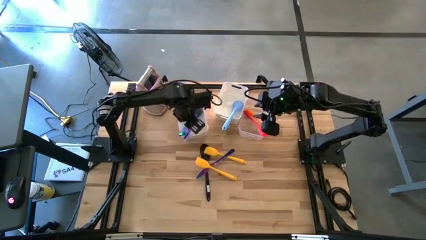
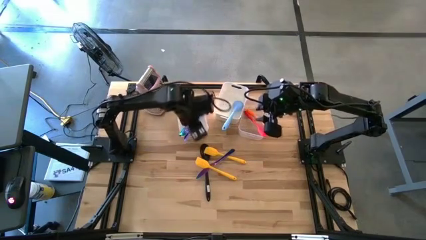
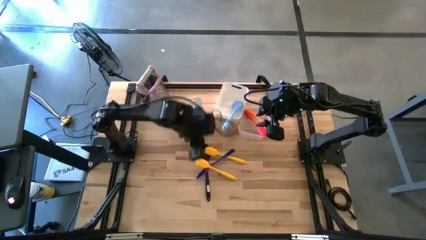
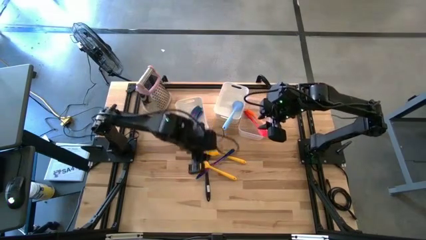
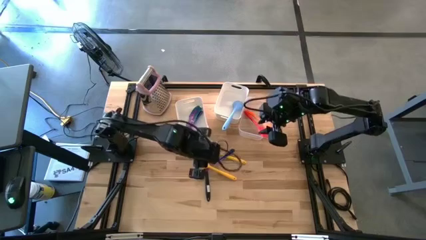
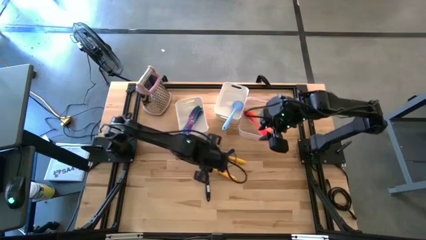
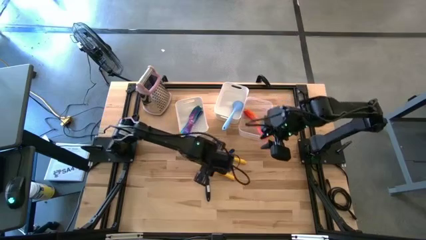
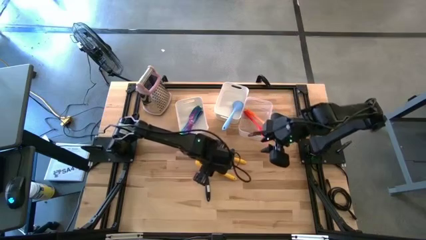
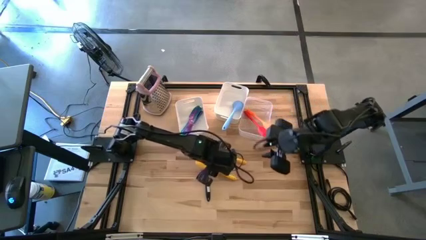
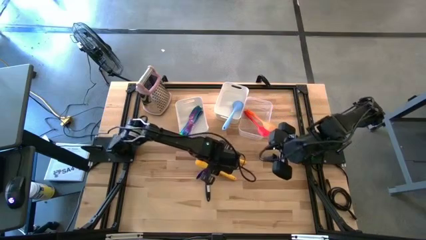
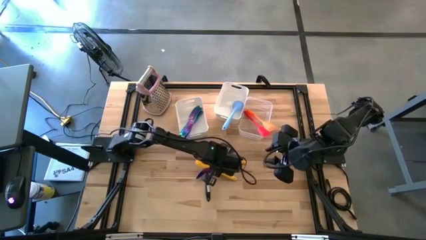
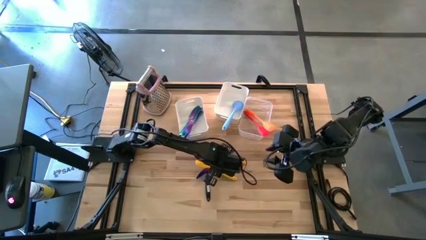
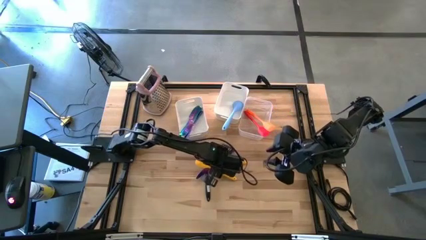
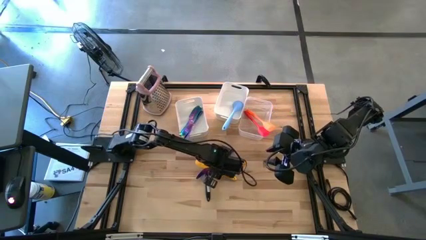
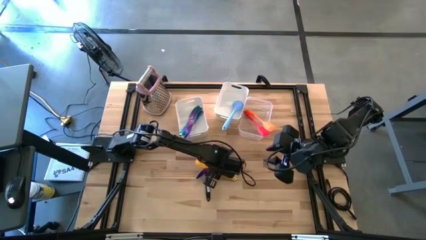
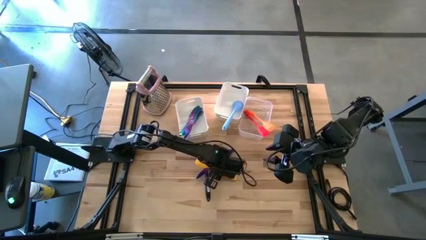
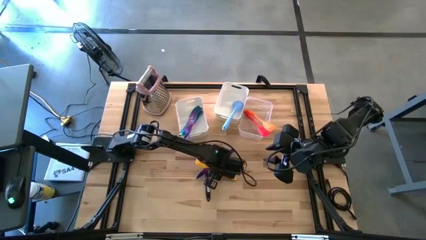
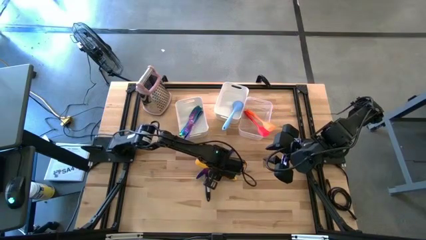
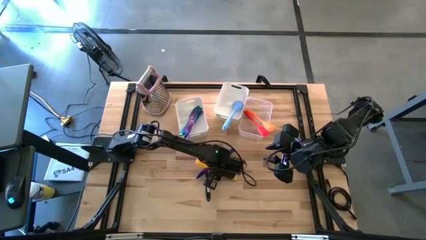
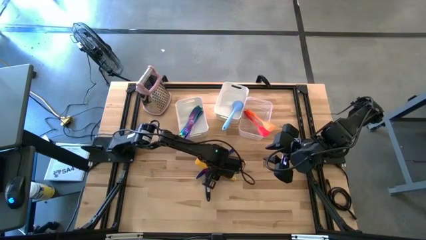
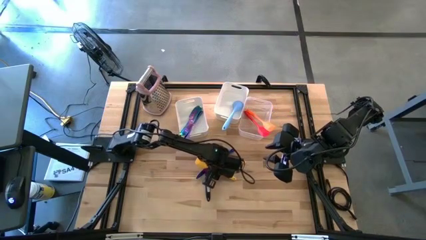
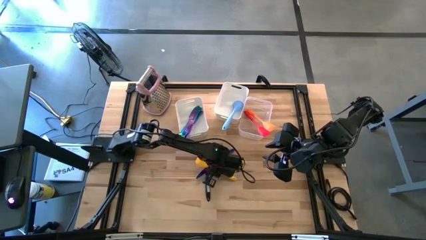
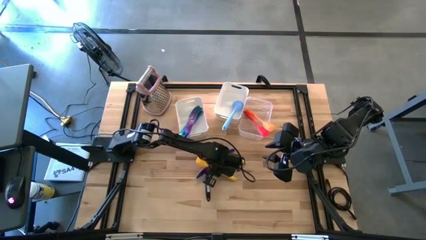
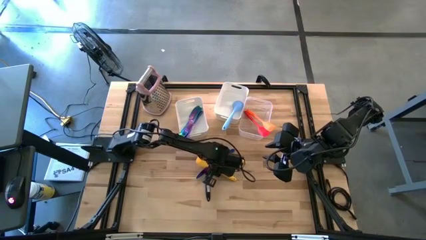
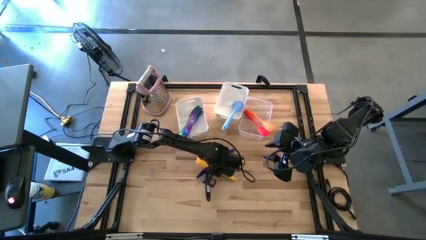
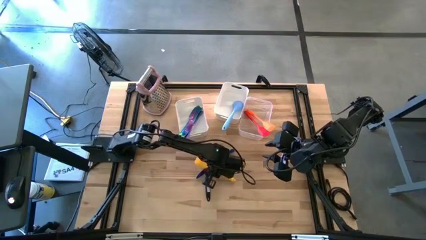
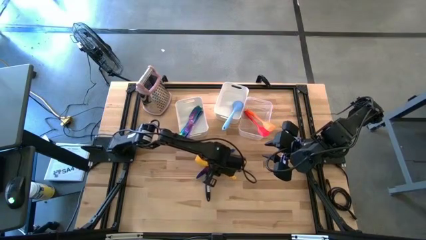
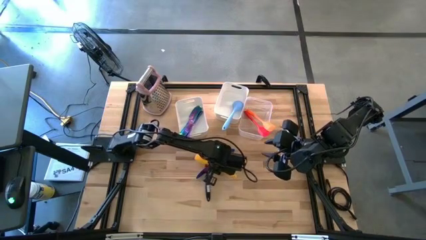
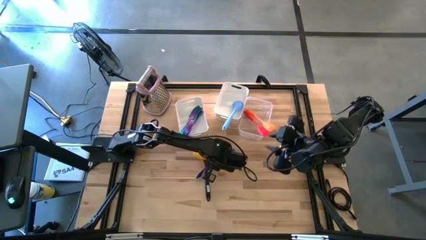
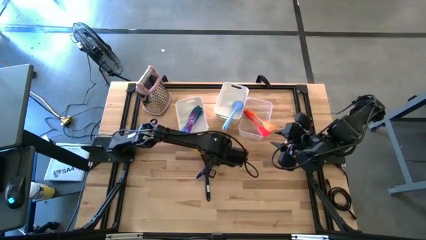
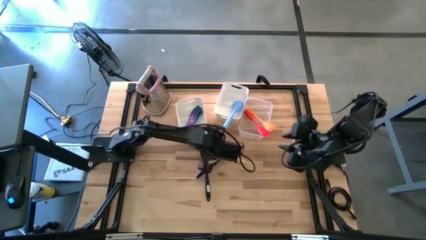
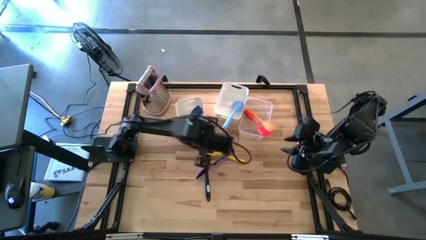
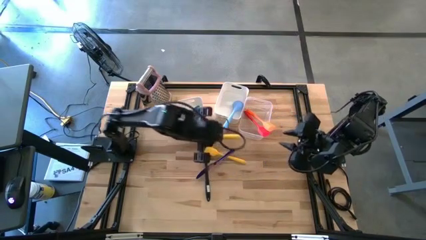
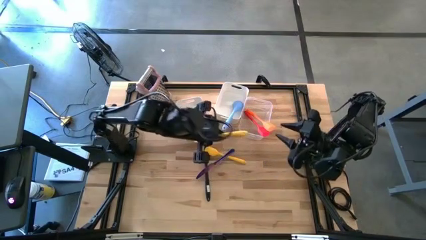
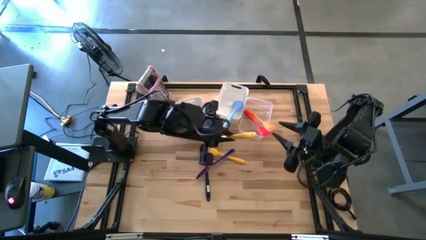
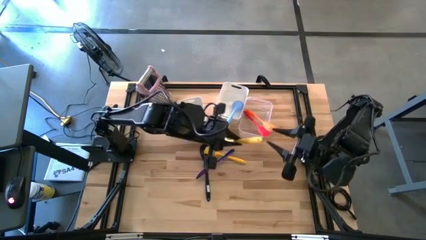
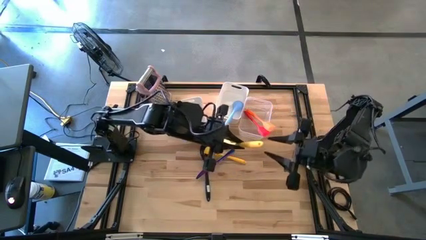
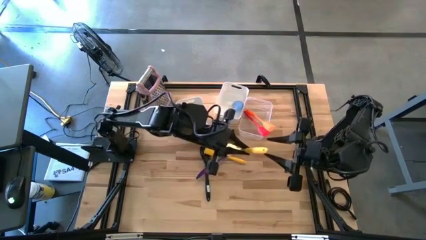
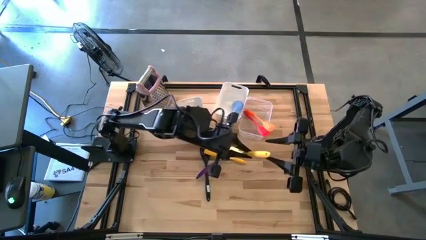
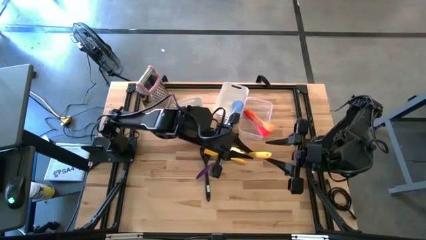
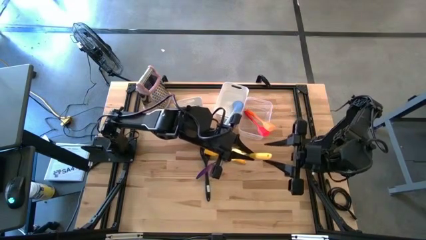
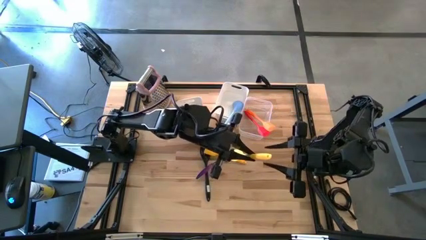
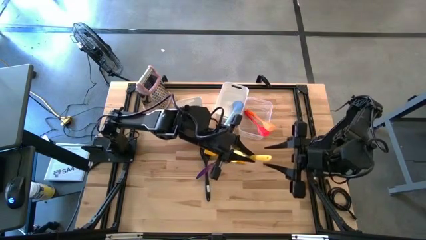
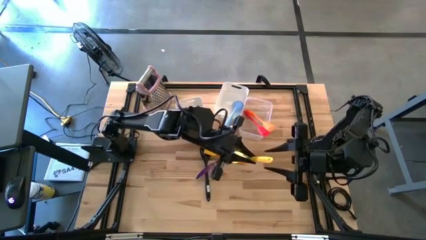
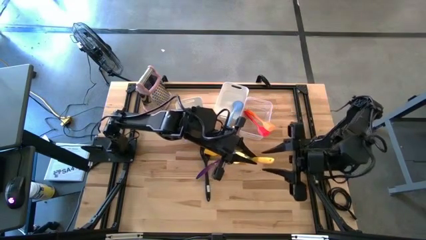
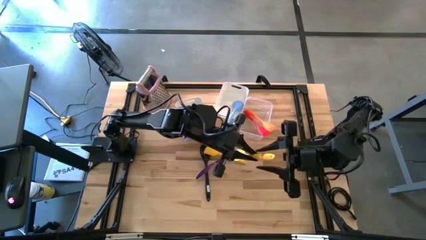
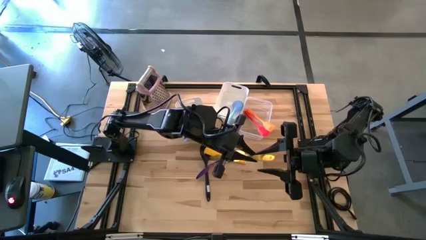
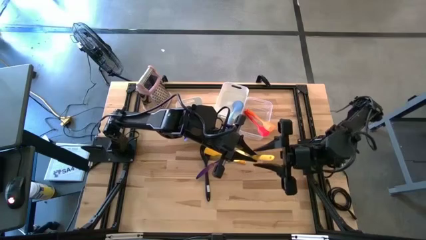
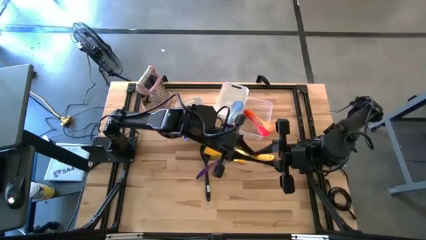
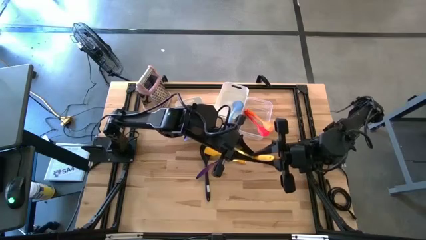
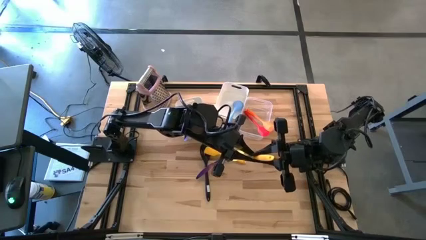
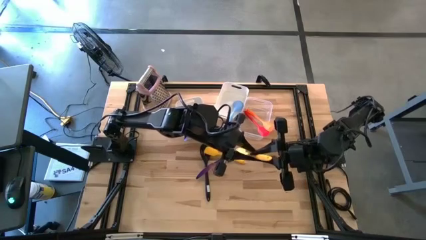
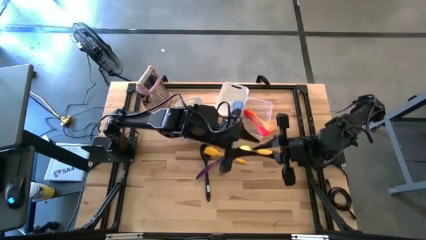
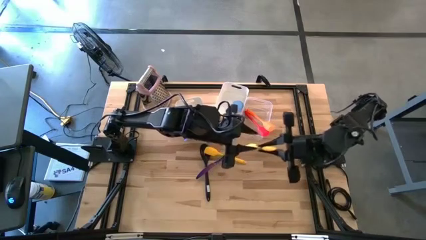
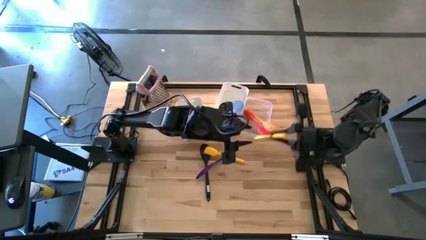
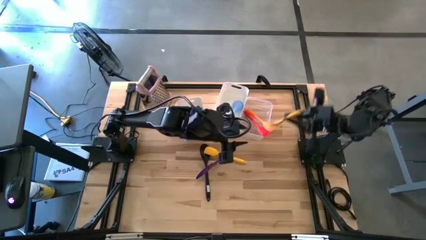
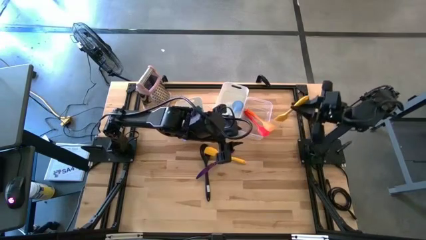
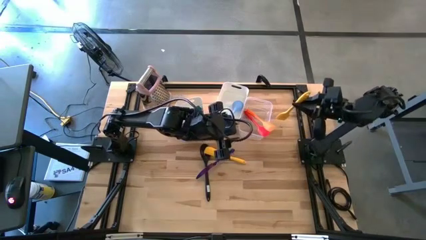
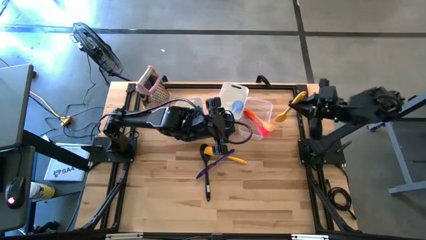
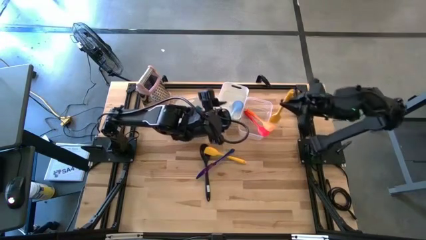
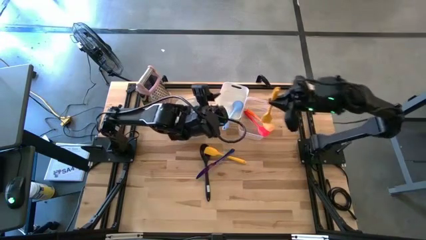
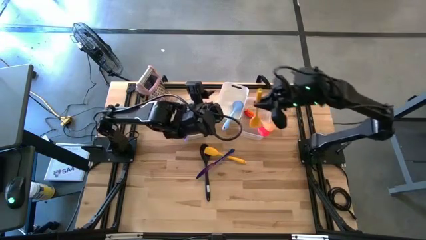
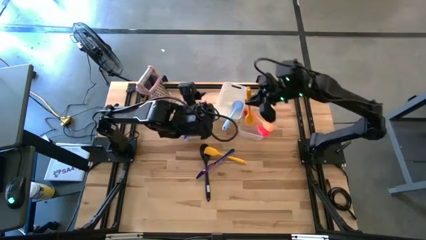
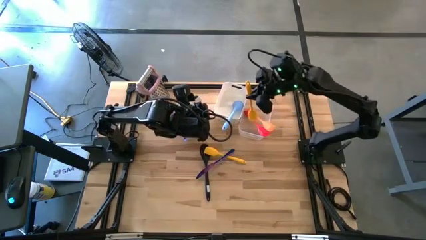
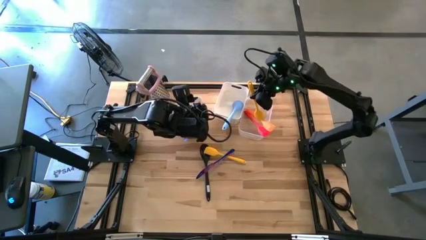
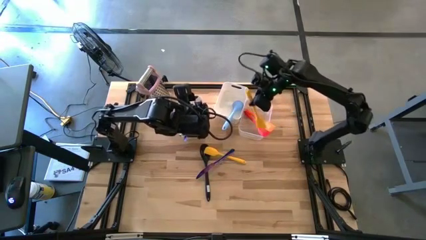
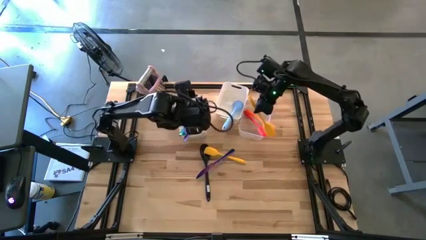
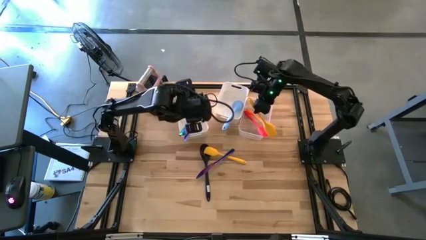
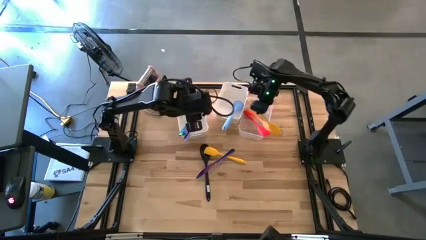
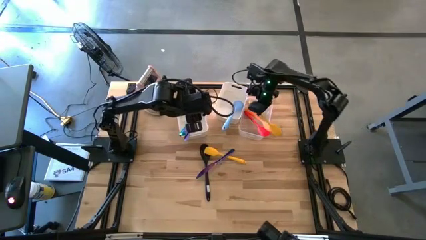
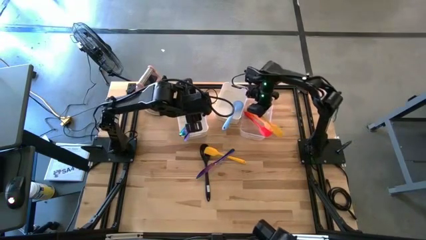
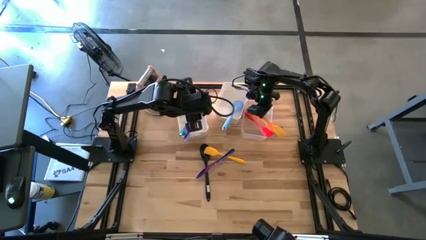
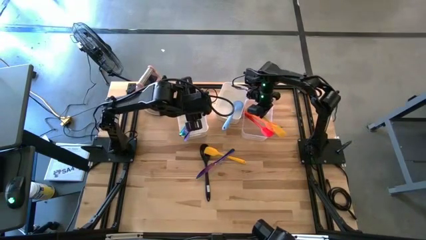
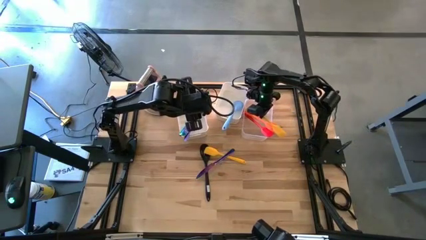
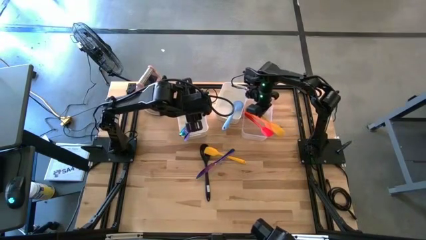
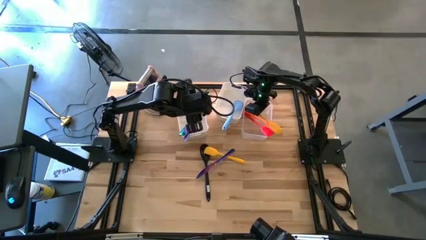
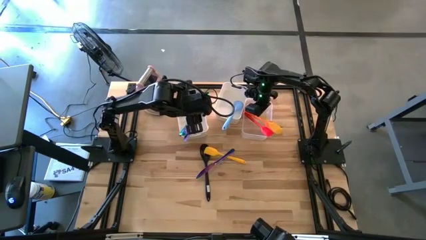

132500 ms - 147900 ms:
Task: Pick & Place Kitchen Items
Put the yellow spatula into the transparent bin
